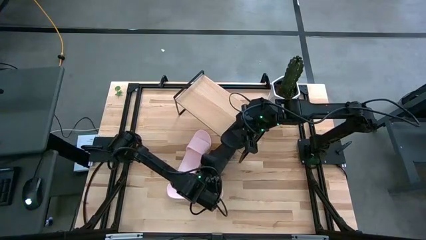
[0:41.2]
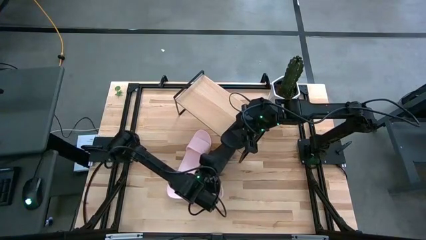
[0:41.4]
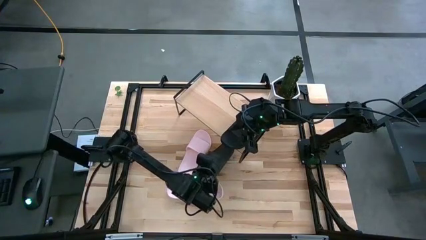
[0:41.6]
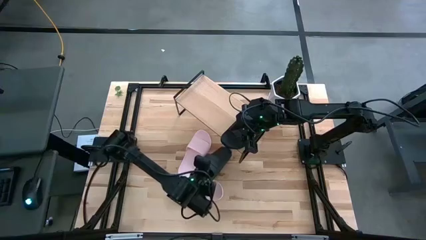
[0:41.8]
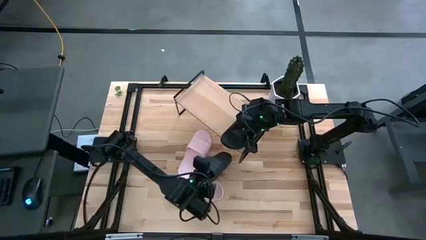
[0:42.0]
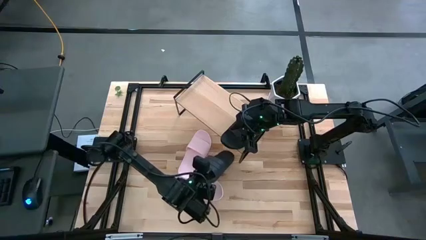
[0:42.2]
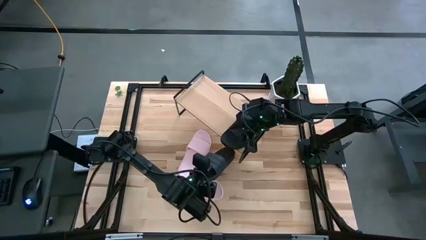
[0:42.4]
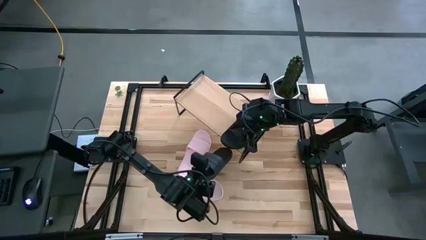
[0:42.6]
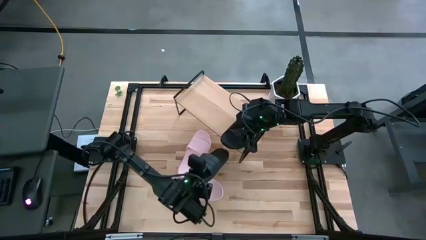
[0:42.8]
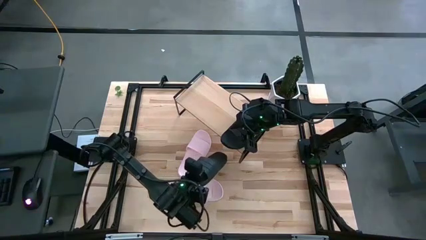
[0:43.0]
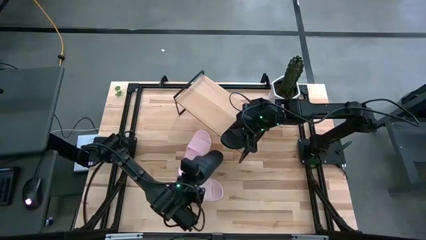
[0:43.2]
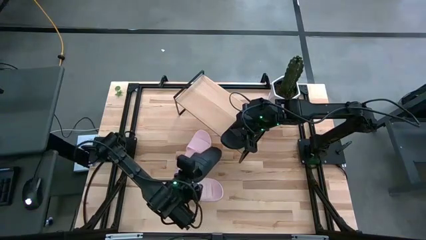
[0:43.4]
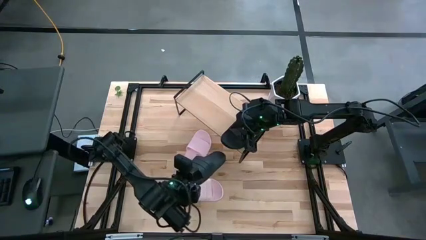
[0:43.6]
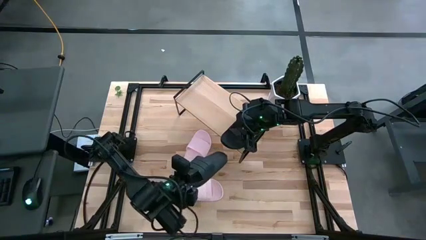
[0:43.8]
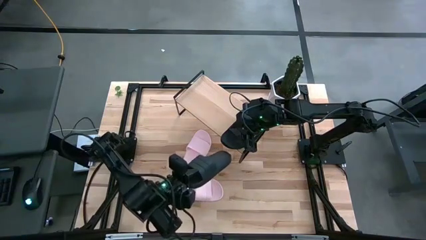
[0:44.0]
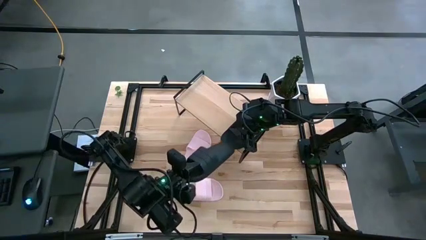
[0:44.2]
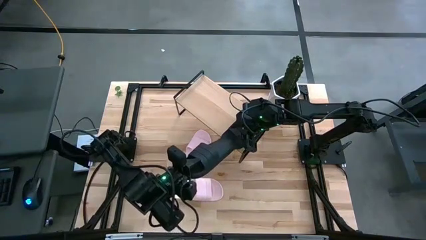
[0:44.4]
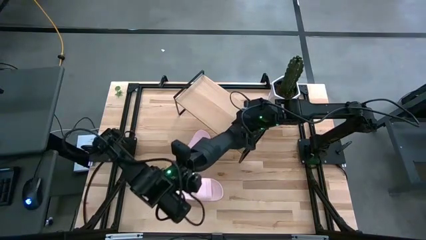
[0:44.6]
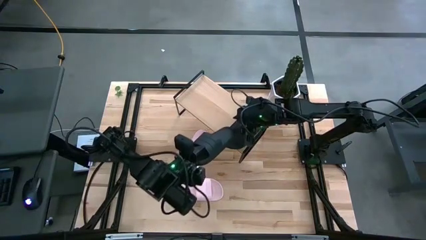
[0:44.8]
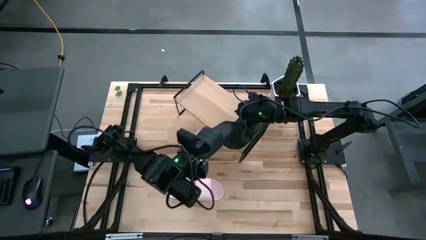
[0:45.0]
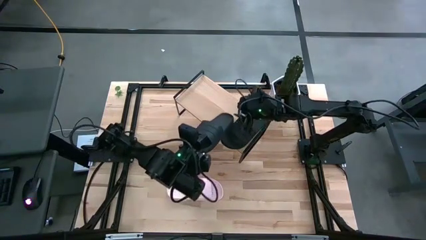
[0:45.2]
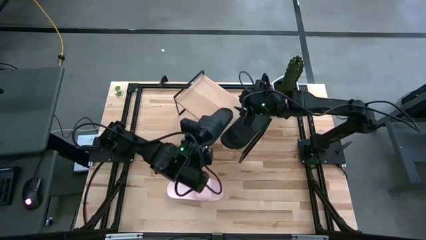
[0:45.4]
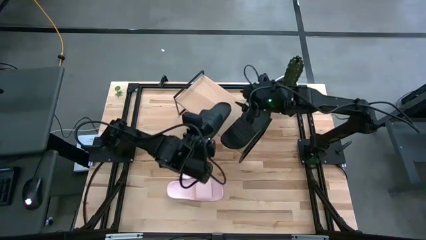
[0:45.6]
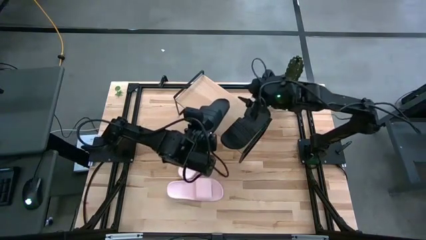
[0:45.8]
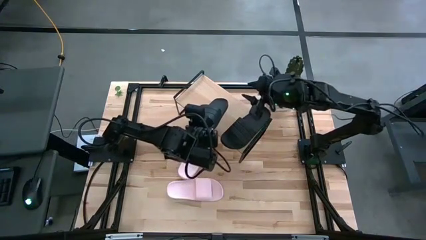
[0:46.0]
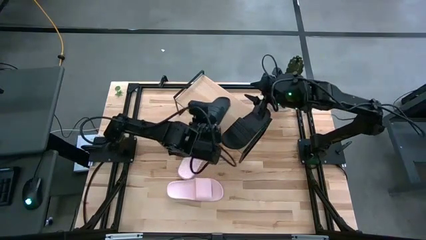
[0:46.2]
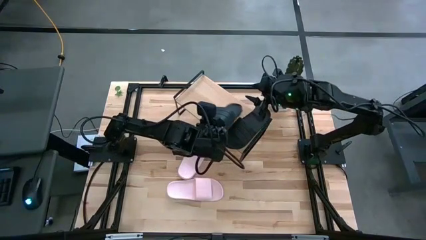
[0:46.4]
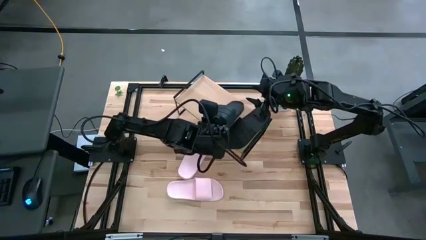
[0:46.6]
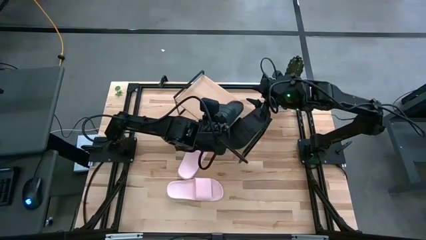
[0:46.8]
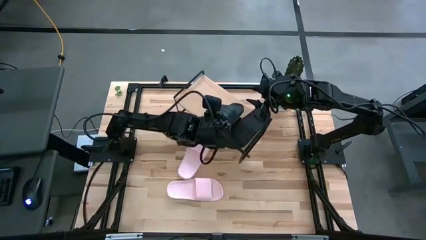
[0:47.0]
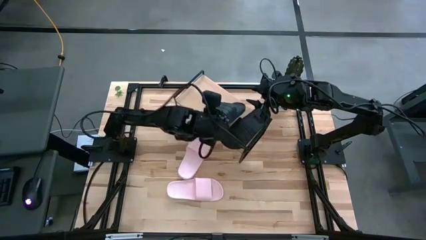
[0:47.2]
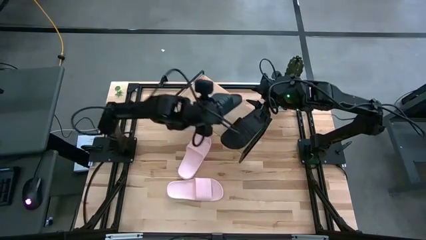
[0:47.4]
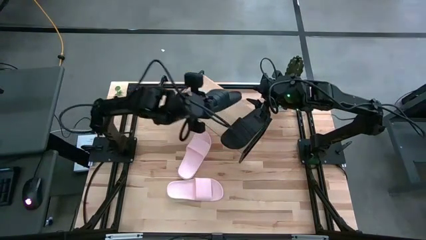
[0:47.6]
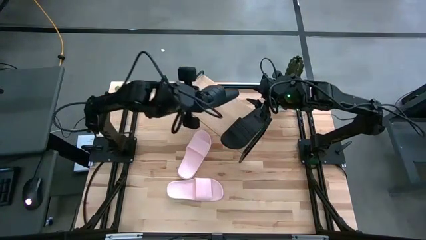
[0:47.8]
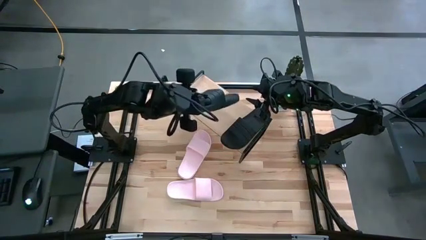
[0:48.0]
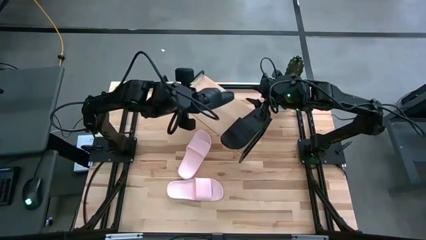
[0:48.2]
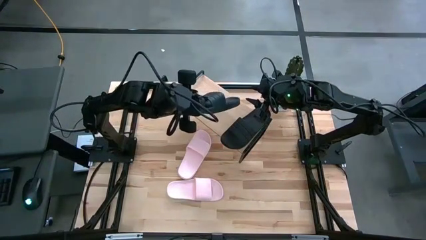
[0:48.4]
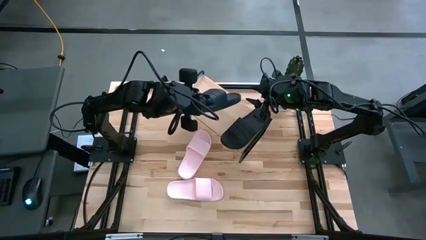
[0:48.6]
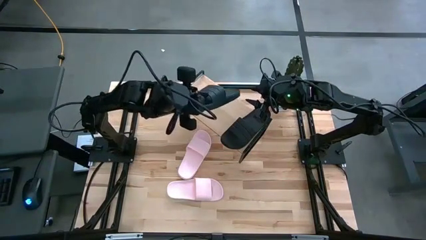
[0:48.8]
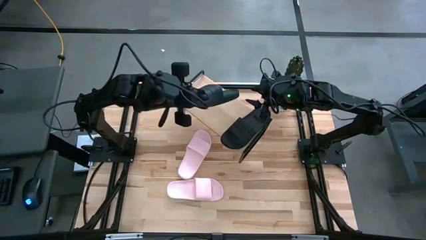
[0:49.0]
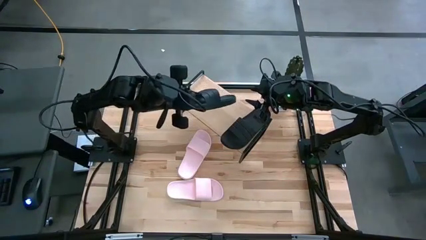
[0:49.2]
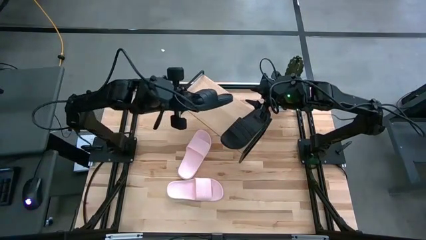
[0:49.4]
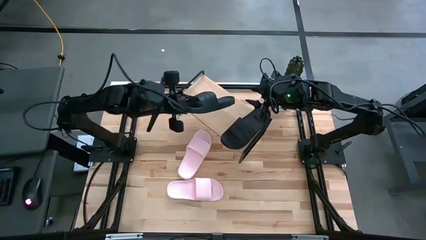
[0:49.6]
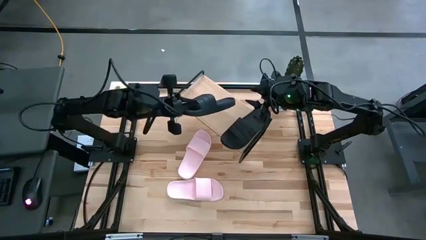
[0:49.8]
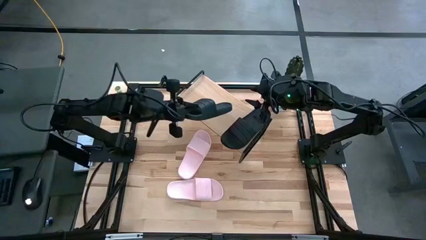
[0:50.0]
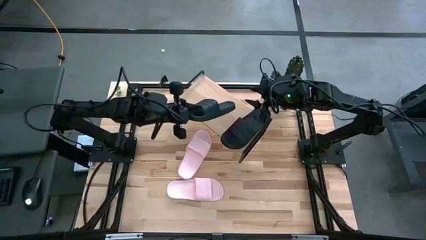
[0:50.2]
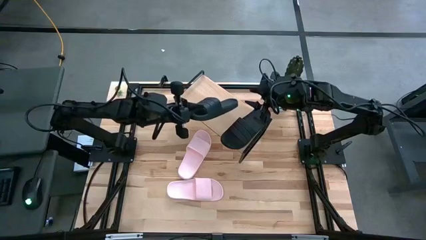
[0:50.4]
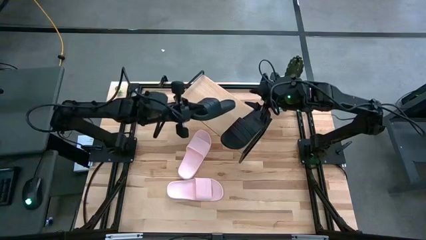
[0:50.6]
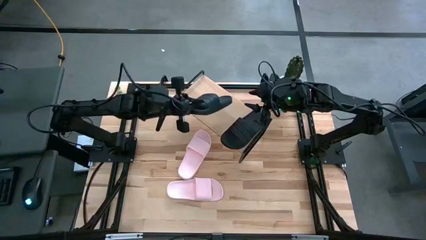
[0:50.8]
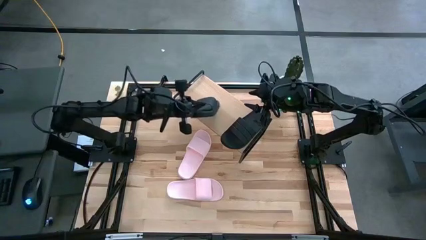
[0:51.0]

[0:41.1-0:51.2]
Task: Pick and place slides into the shelf
Put the black slipper on the shelf

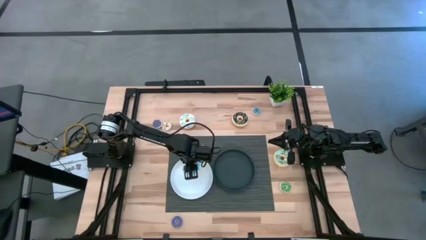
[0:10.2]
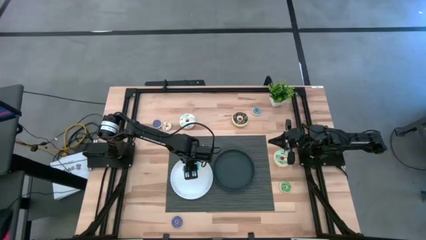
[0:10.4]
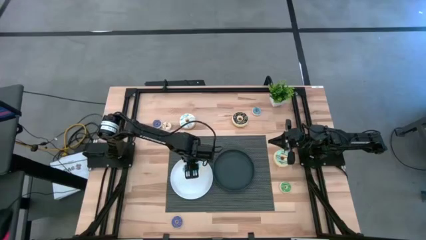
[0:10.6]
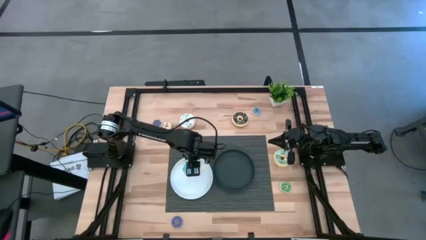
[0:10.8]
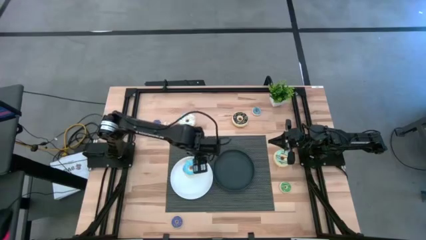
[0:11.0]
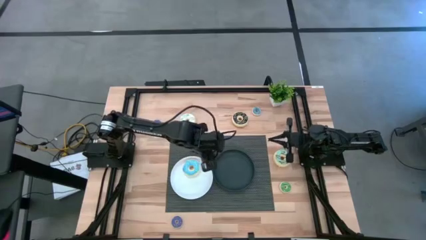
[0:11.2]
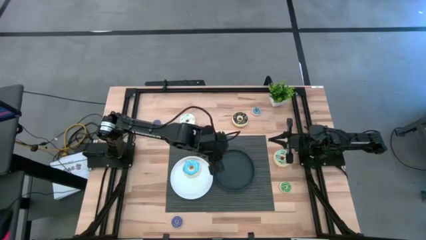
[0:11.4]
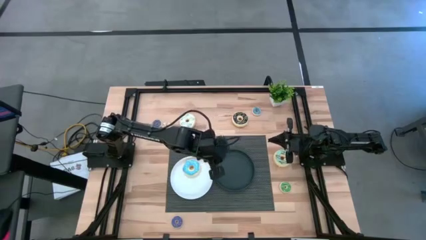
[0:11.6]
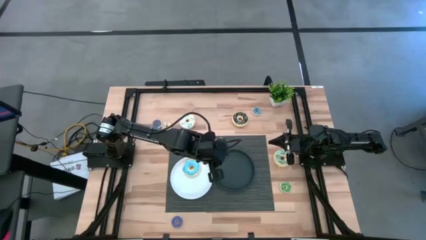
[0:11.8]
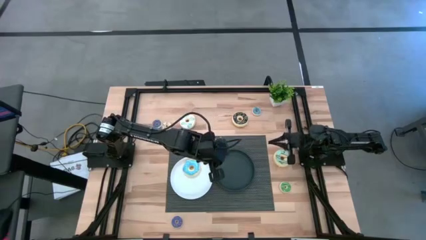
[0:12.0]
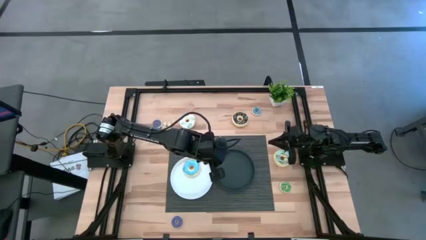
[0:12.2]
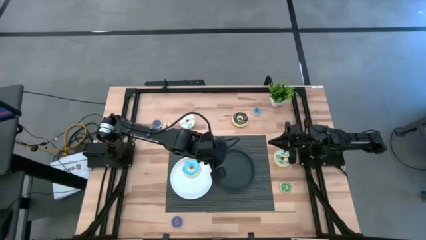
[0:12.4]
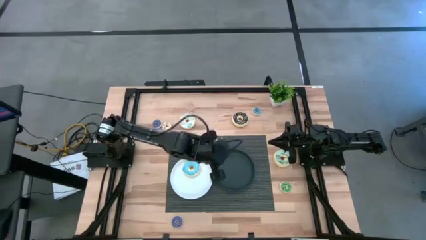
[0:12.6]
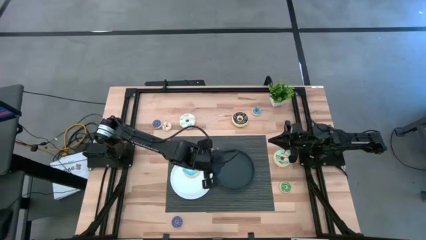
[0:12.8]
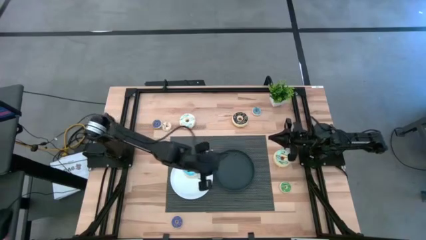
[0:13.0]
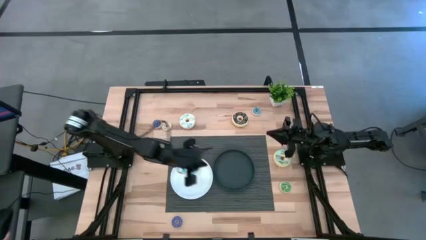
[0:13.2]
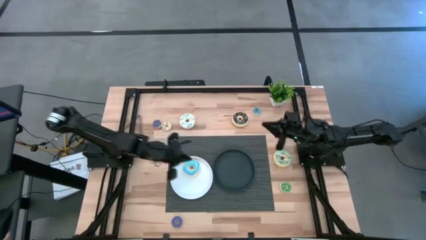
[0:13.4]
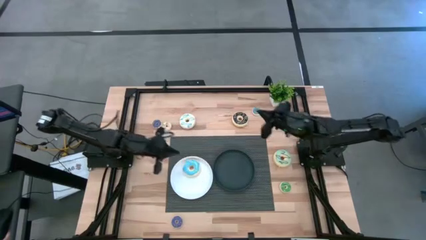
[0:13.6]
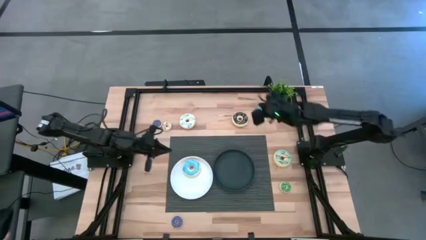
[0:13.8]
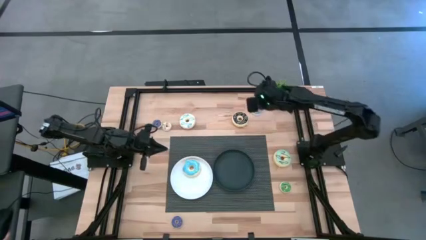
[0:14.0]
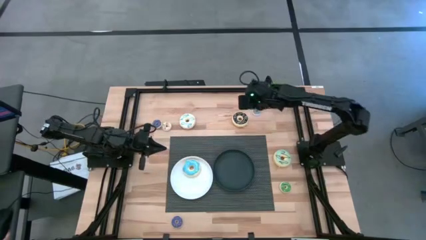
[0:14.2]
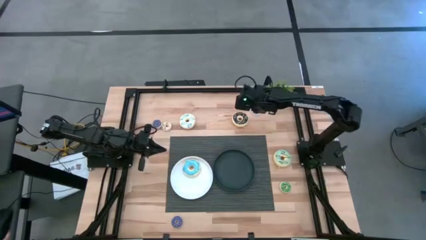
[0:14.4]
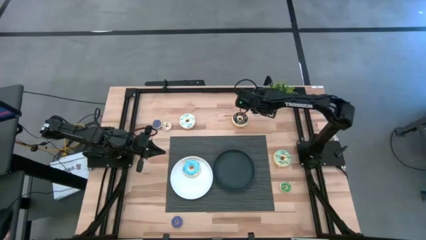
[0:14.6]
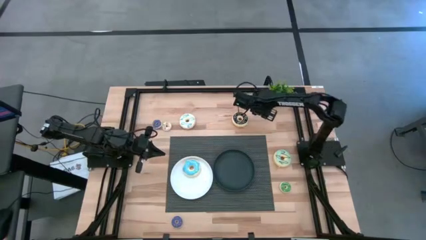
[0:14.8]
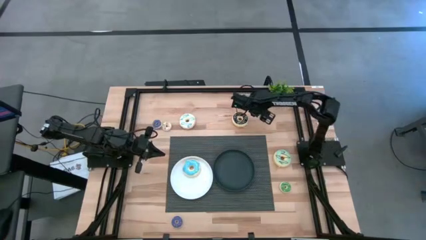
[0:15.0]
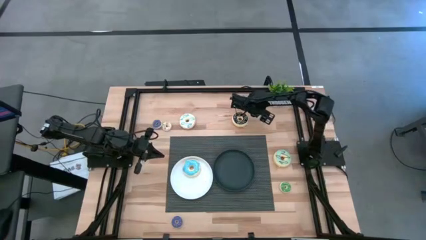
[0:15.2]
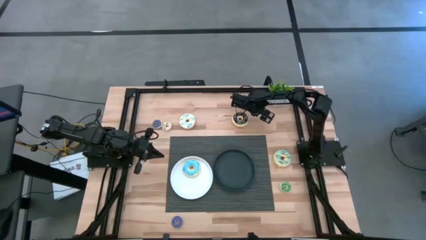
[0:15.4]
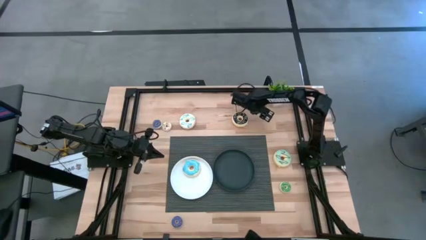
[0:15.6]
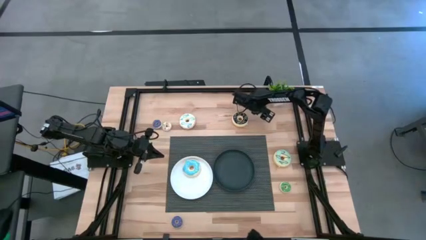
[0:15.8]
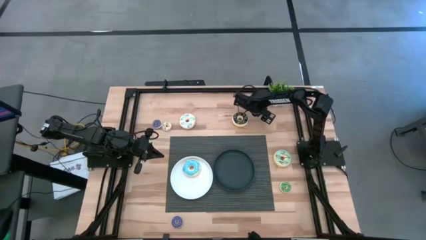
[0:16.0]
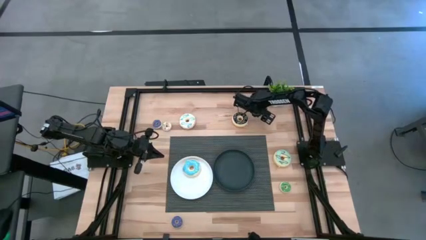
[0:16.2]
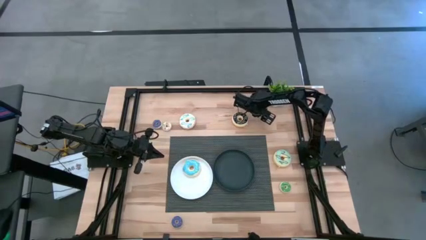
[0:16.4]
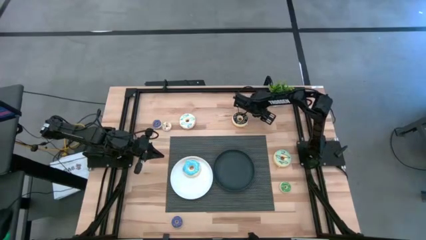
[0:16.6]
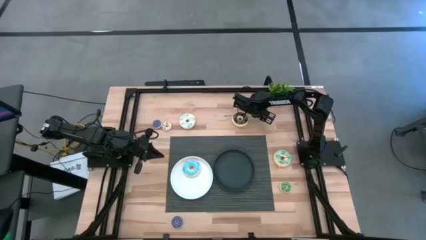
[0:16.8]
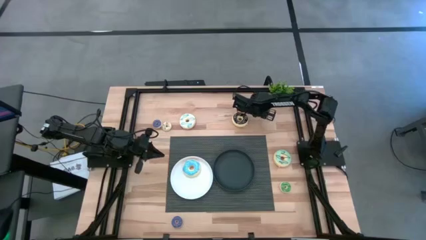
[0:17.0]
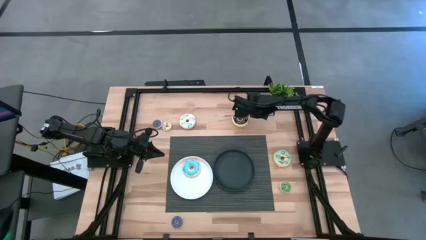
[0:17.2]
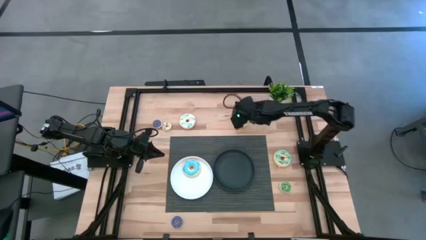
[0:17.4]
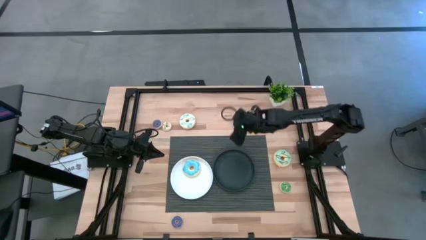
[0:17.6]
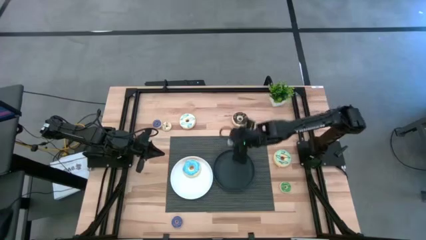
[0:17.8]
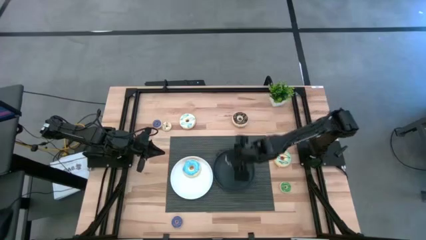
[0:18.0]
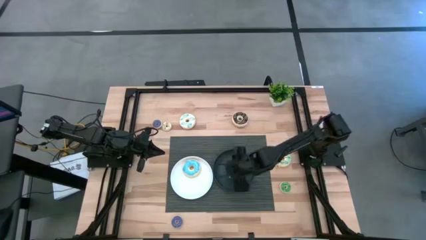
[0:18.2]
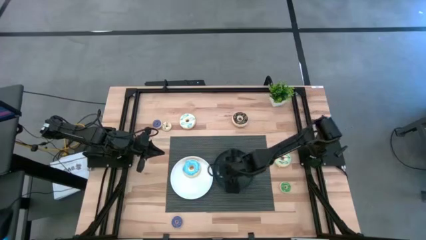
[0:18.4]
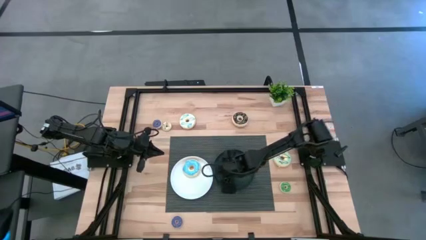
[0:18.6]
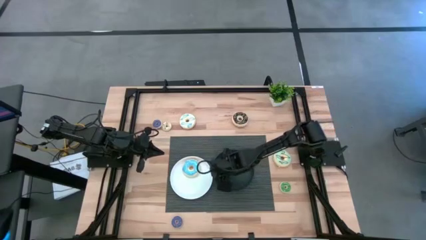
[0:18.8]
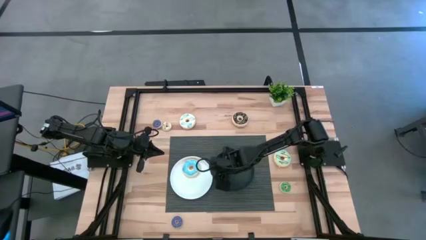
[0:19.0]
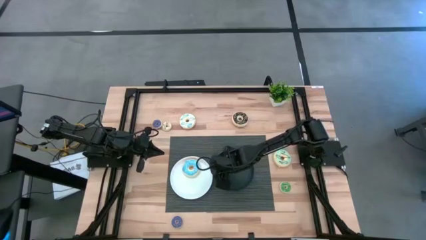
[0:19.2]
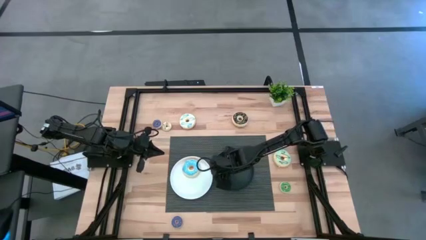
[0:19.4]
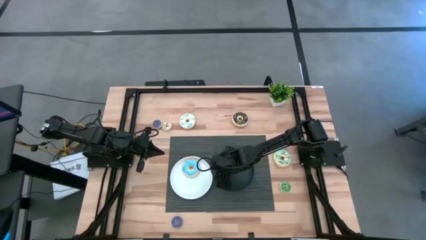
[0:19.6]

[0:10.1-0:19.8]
Task: Pick & Place donuts
Put the small blue donut on the black plate
